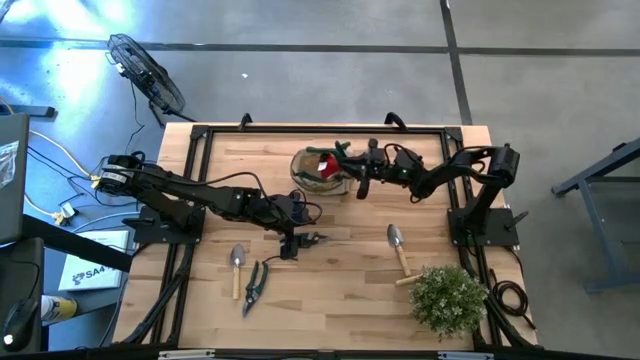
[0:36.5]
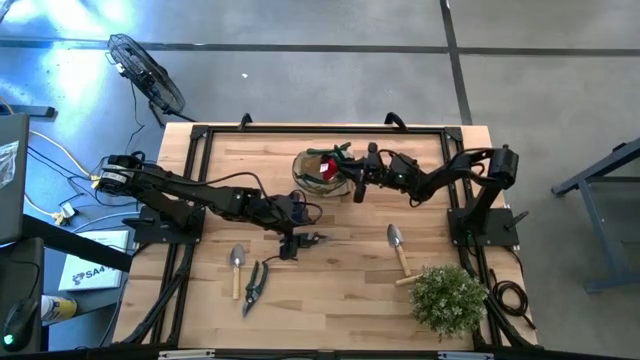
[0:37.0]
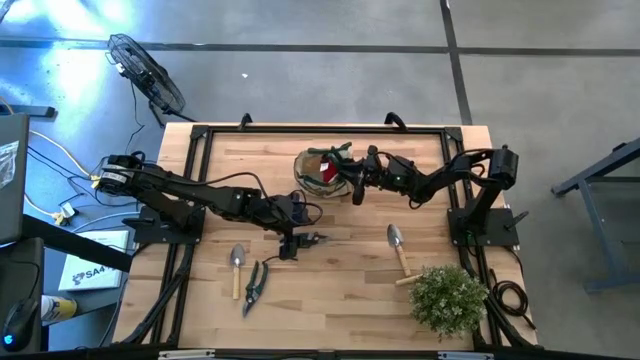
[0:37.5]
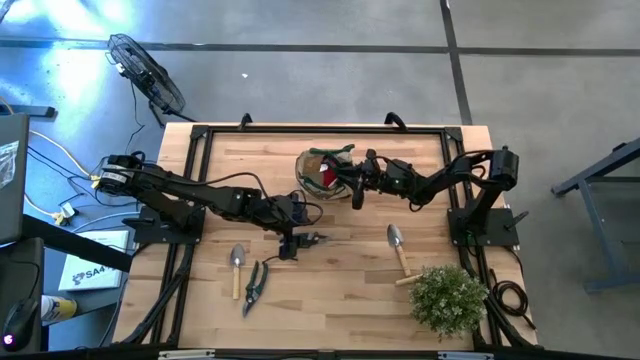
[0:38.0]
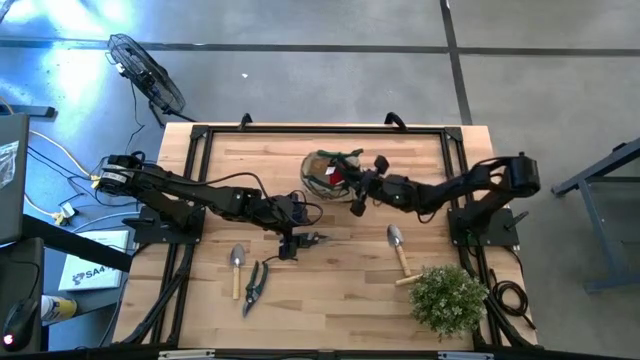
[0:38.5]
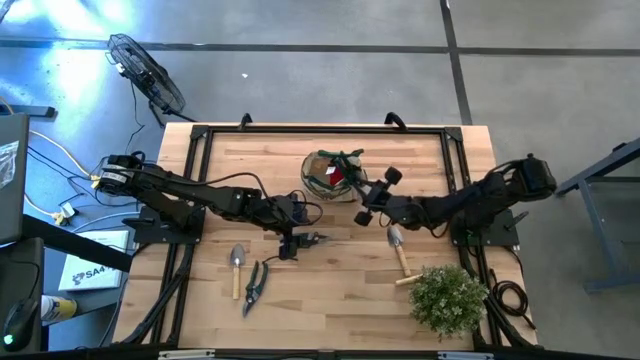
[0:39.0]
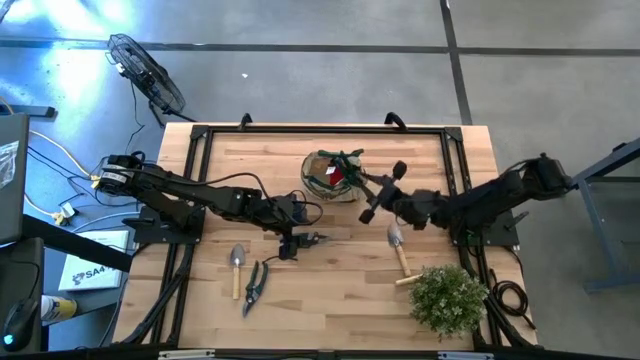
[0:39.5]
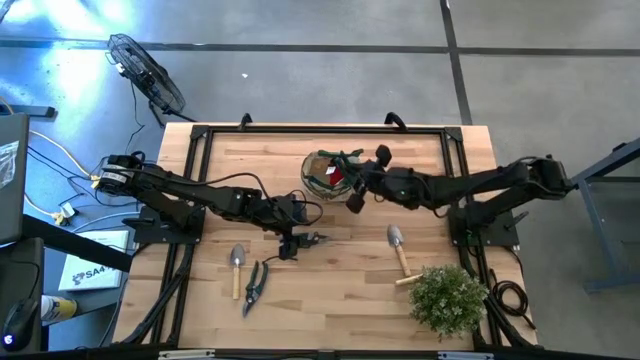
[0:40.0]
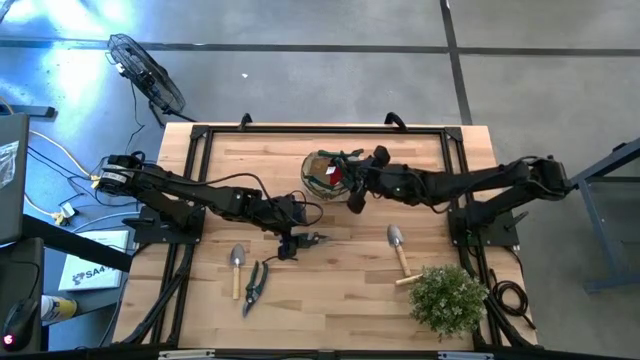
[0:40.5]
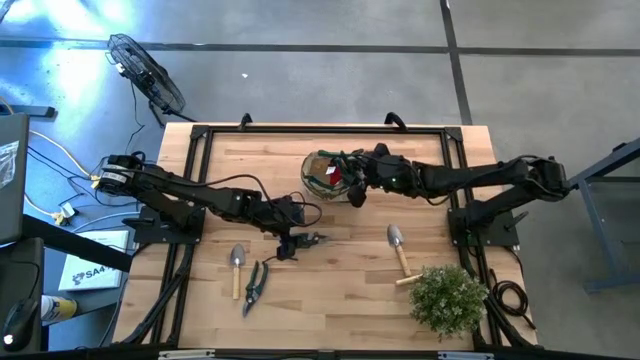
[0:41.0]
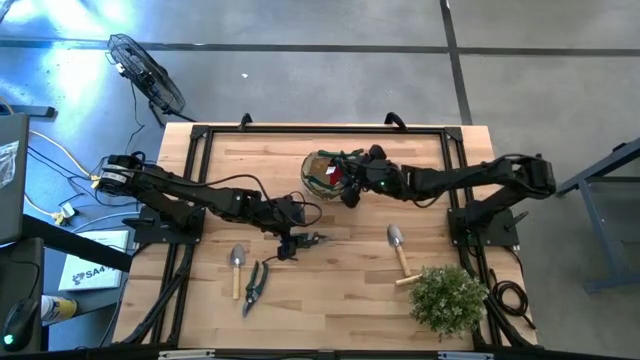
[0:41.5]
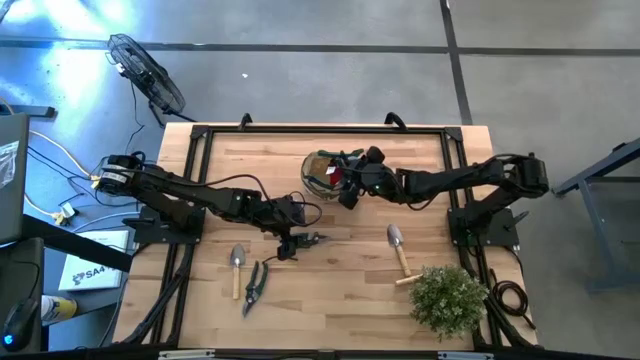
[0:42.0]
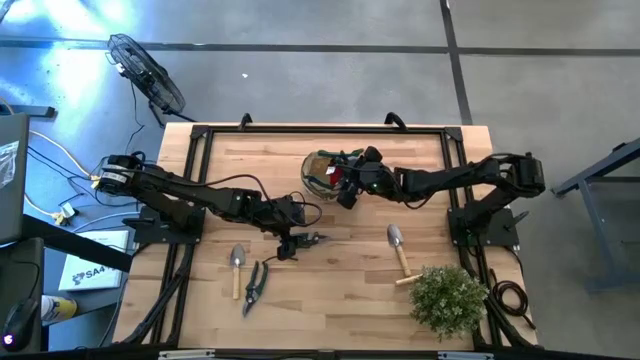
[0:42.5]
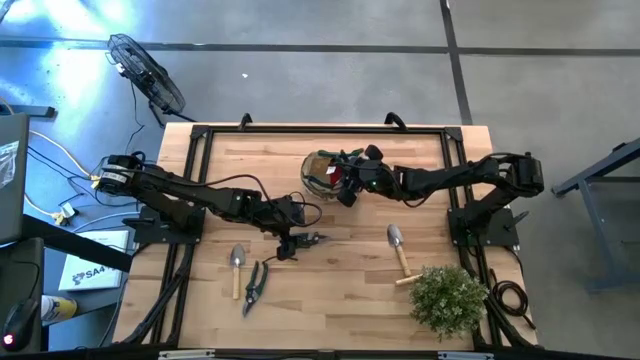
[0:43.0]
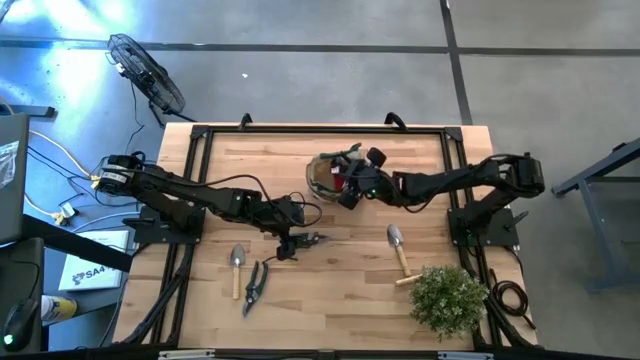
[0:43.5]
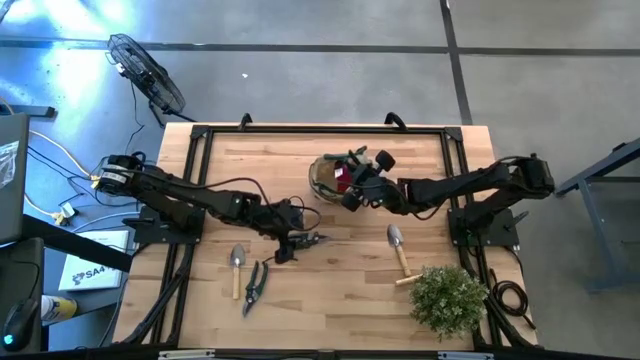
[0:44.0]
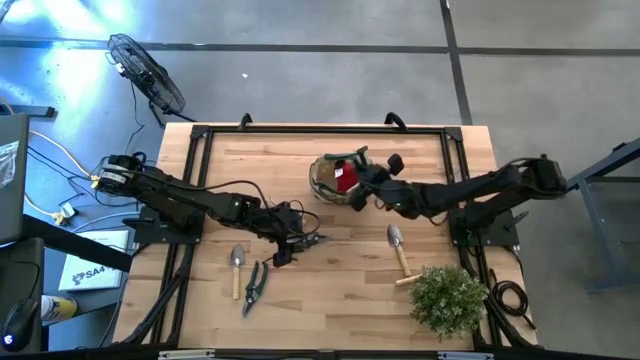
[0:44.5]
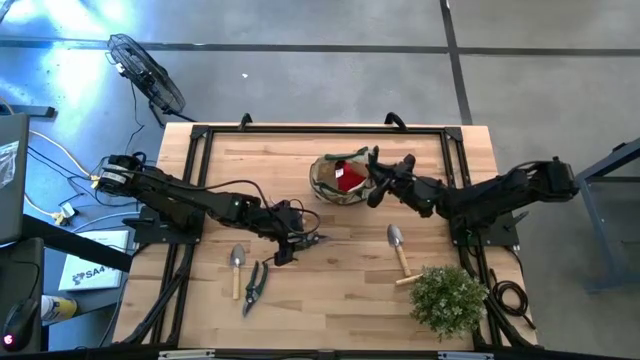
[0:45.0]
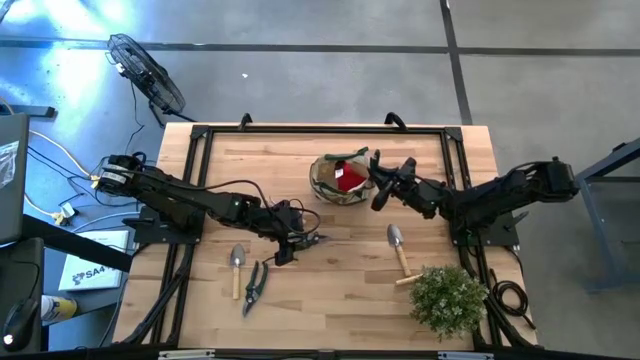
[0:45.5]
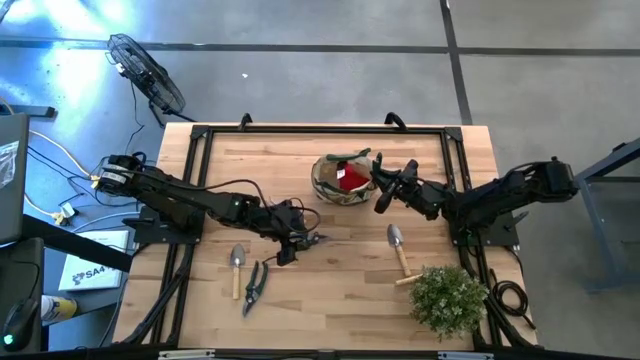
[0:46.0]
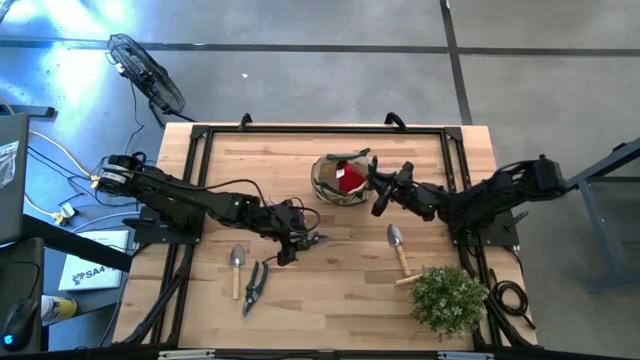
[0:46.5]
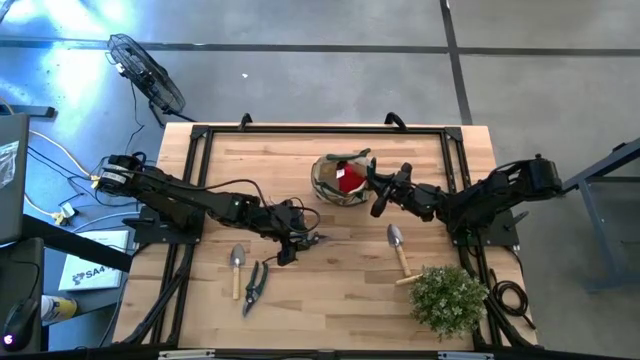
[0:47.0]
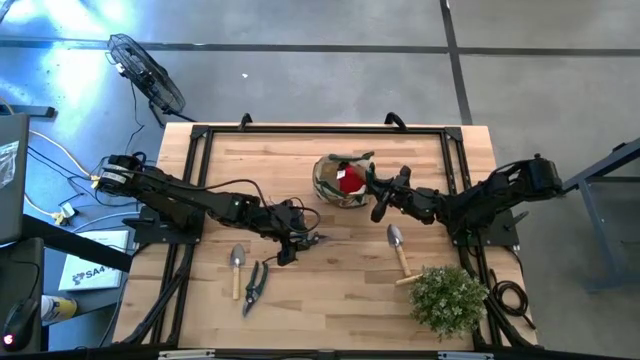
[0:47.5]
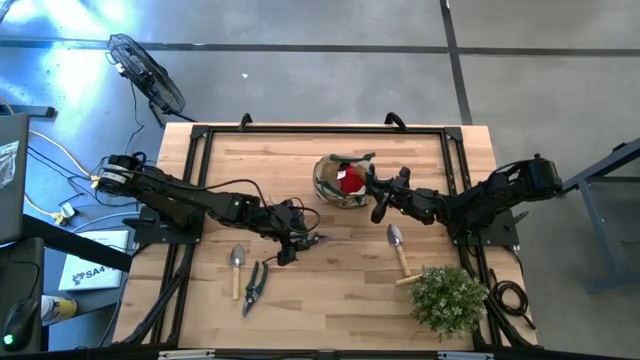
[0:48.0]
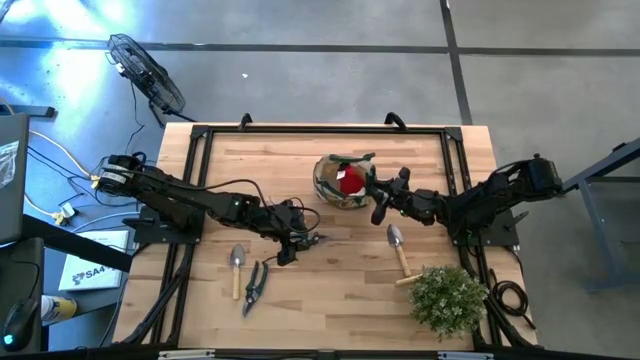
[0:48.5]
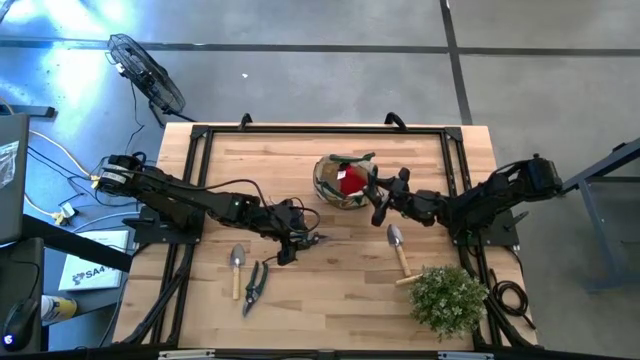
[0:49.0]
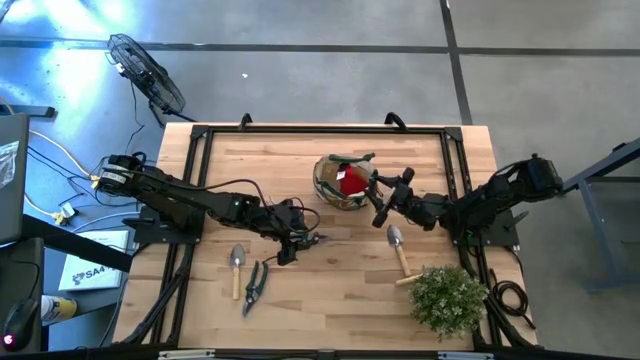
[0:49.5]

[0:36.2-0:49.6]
Task: Pick & Place Garden tools in Gardening bag
Put the top right green shear scissors into the light brown gardening bag

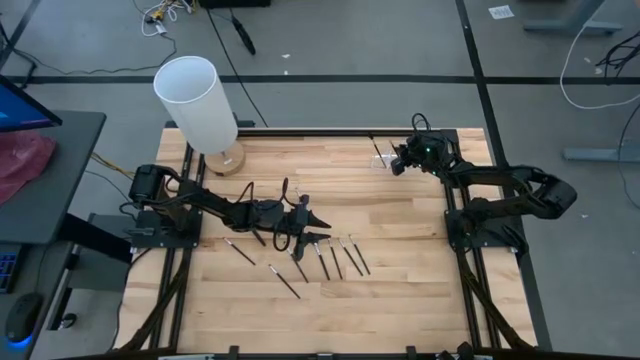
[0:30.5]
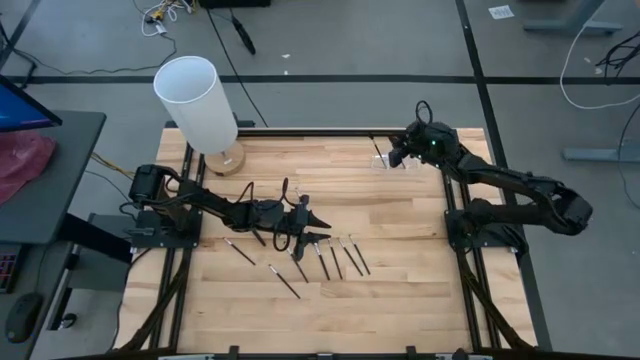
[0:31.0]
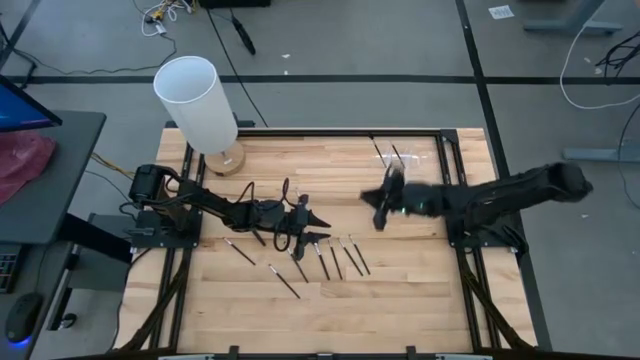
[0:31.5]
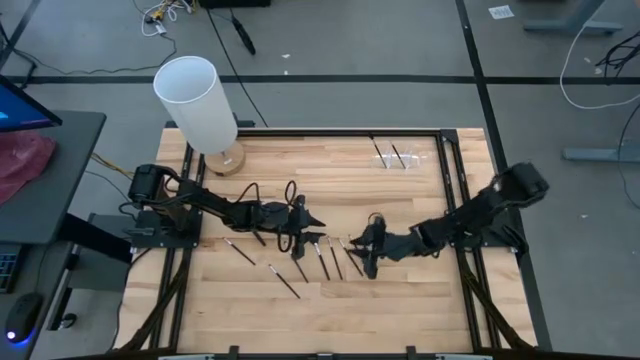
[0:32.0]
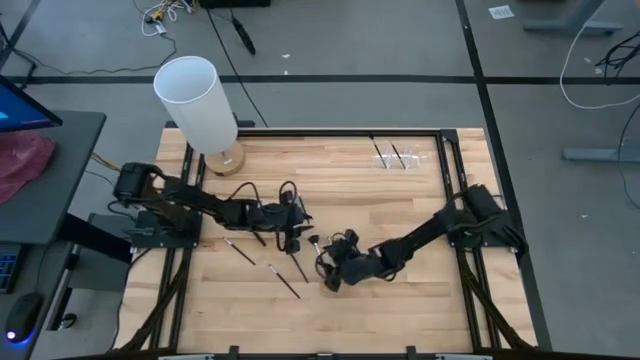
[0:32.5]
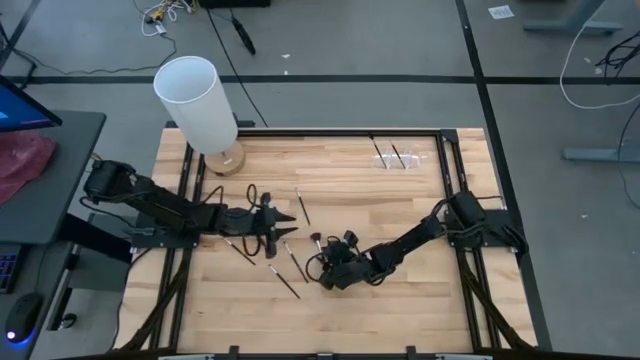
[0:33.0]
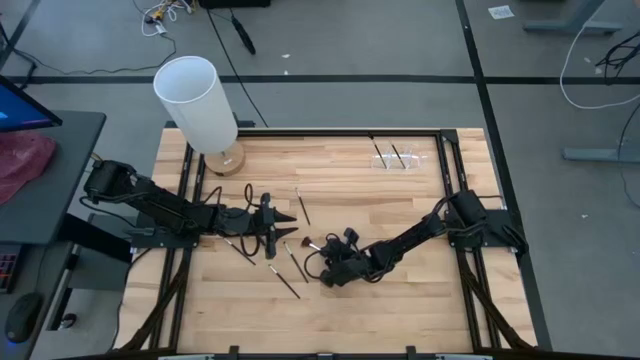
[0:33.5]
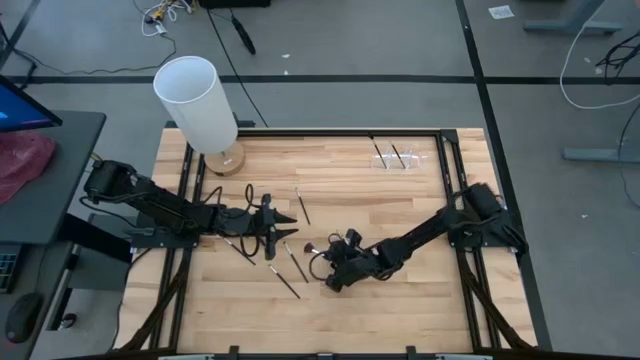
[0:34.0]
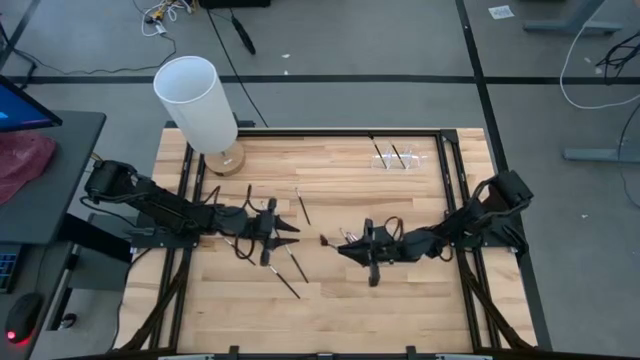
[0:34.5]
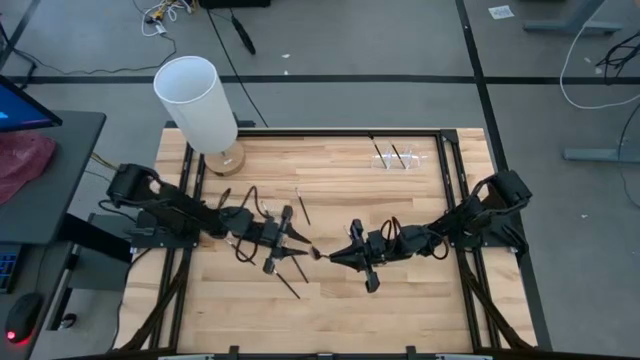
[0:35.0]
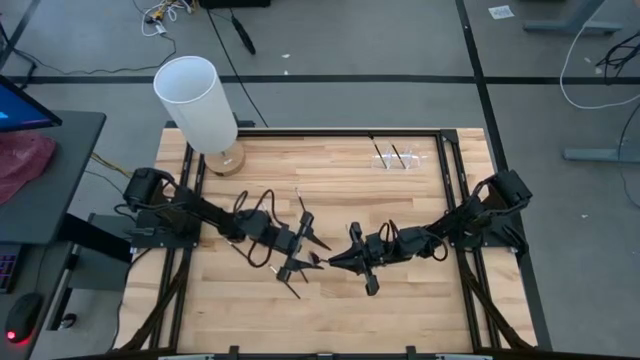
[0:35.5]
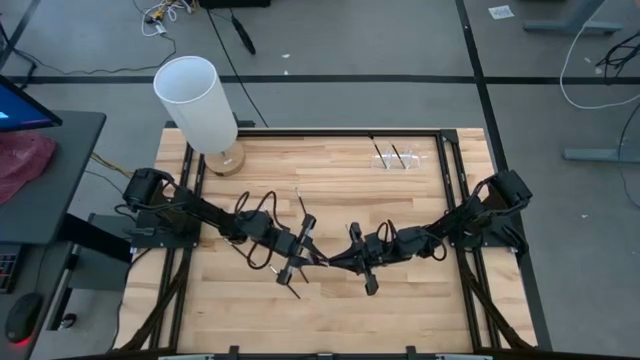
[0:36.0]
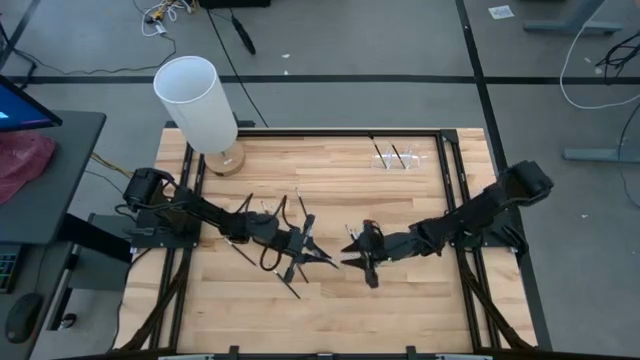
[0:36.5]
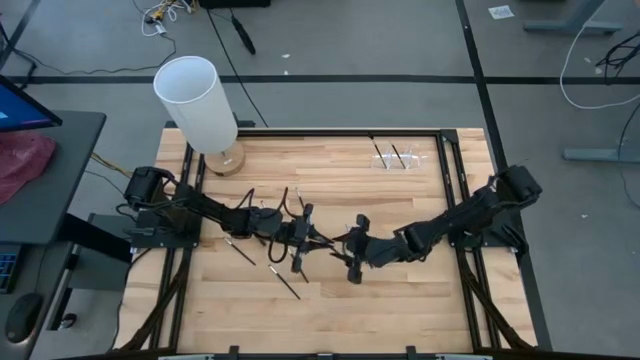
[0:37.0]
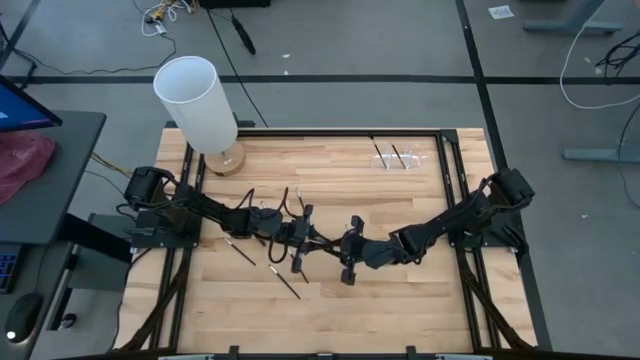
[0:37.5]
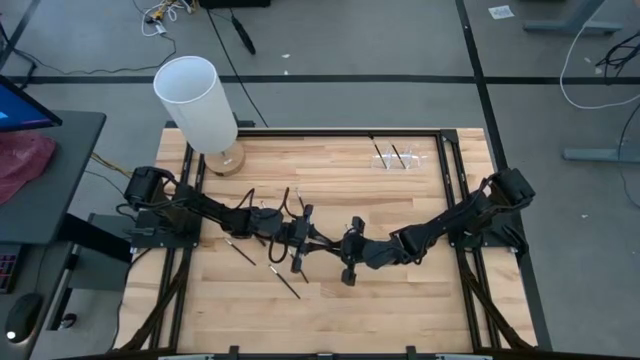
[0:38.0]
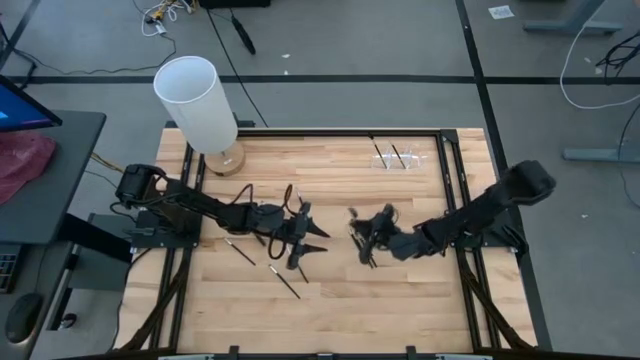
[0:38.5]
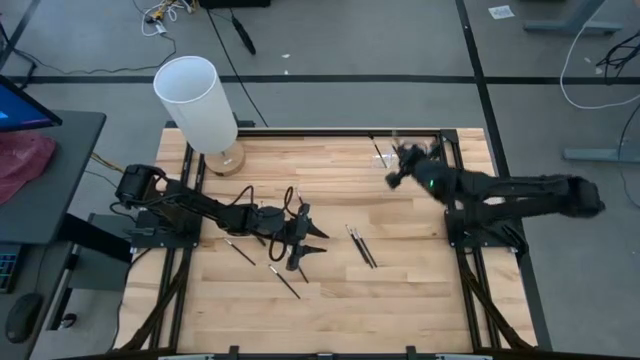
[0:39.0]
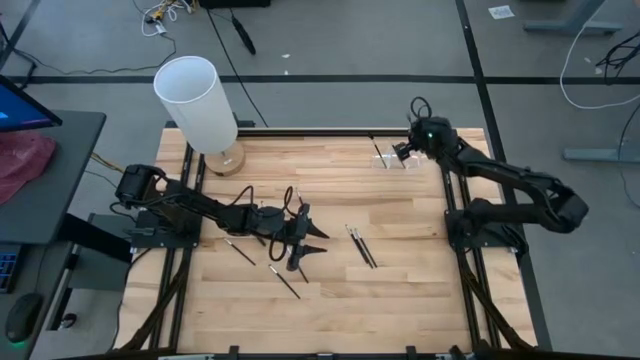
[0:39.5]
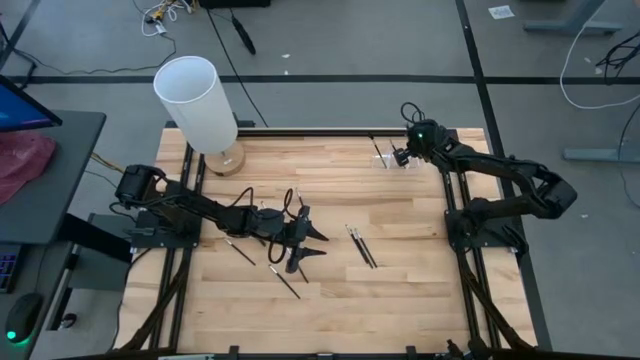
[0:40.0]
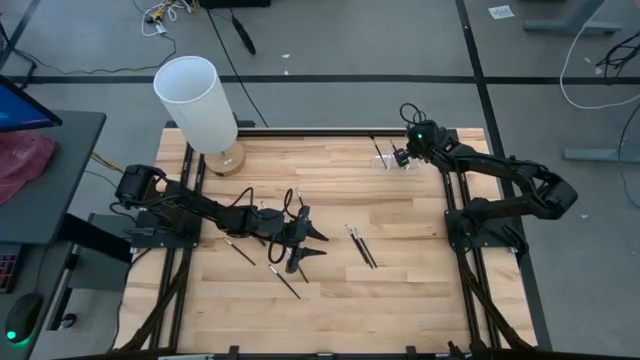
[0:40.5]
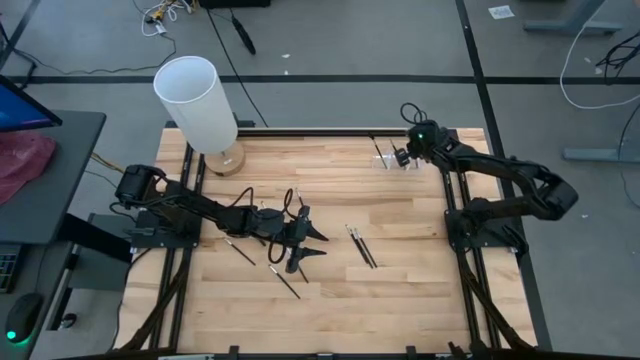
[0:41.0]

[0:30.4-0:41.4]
Task: Put items in baskets/containers
Put the highlighter brush into the transparent organizer
